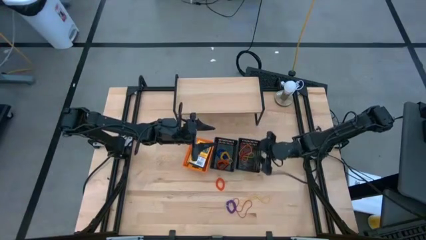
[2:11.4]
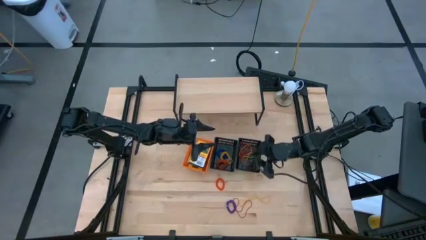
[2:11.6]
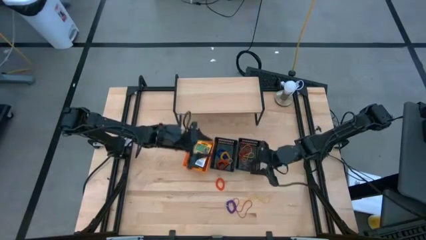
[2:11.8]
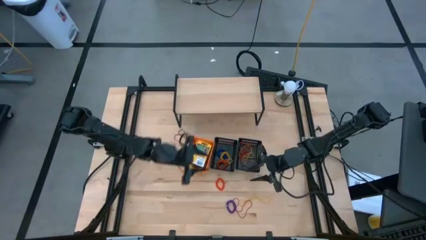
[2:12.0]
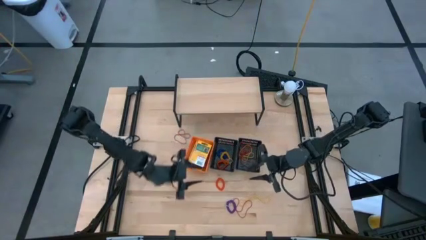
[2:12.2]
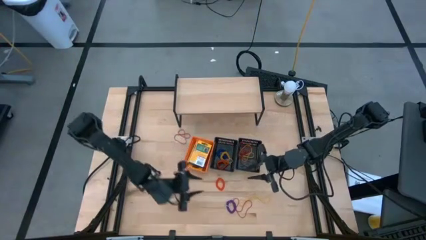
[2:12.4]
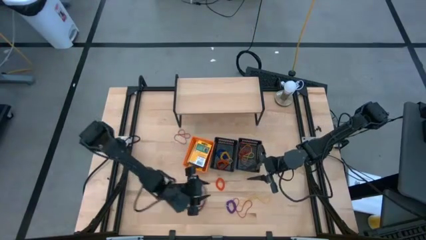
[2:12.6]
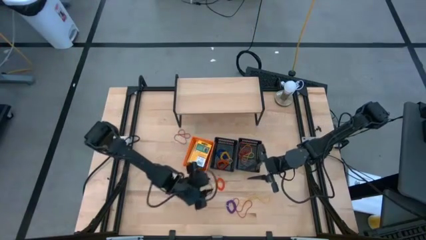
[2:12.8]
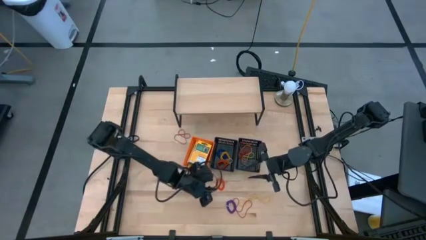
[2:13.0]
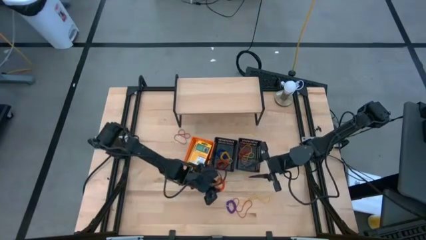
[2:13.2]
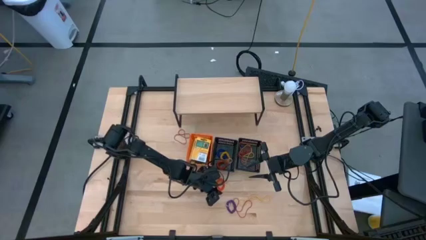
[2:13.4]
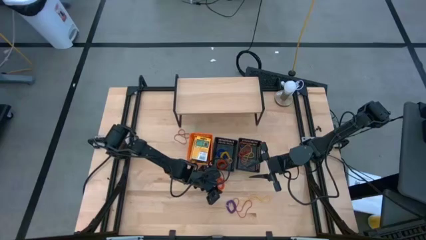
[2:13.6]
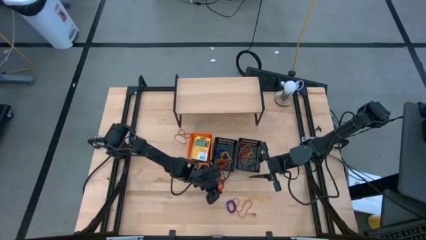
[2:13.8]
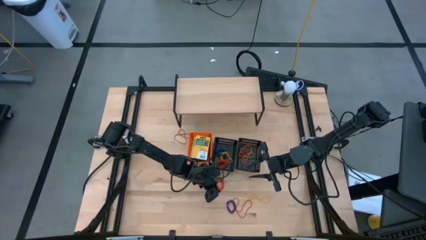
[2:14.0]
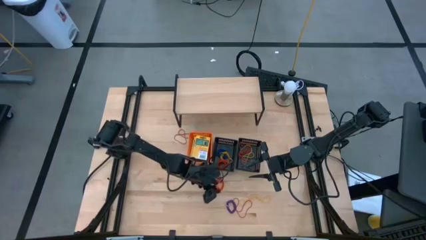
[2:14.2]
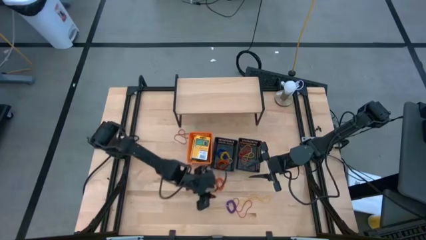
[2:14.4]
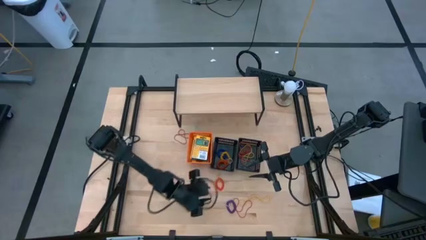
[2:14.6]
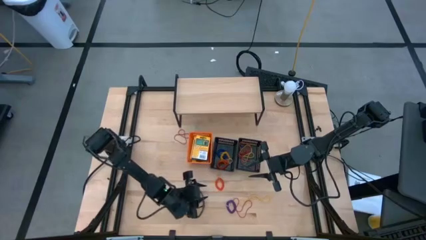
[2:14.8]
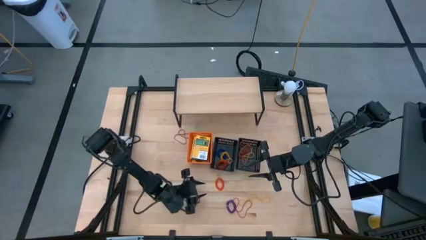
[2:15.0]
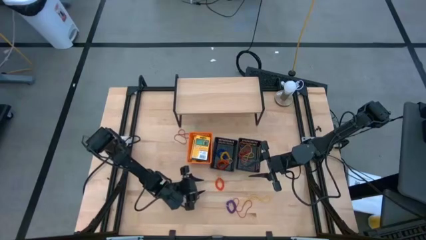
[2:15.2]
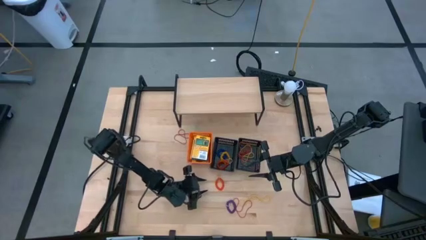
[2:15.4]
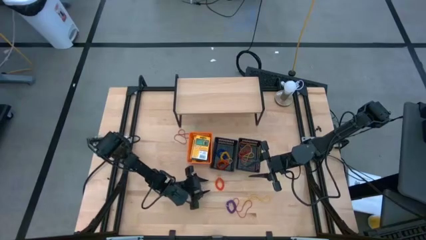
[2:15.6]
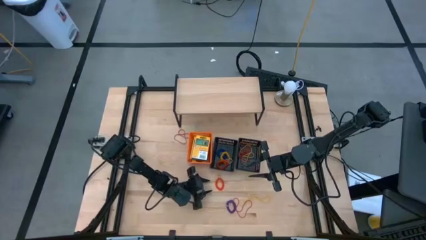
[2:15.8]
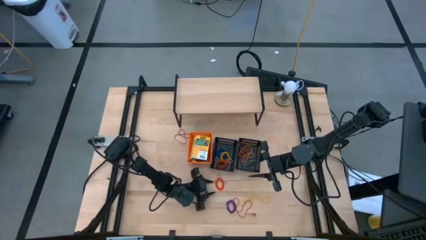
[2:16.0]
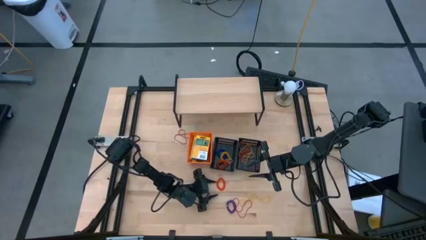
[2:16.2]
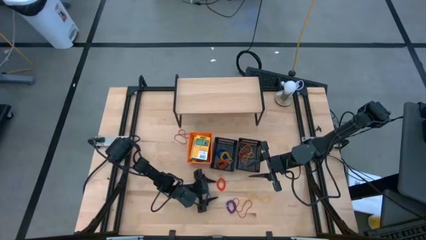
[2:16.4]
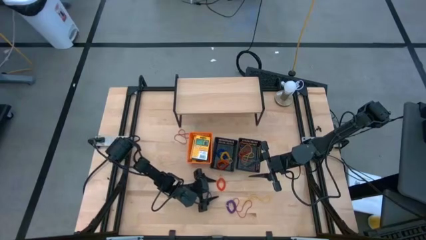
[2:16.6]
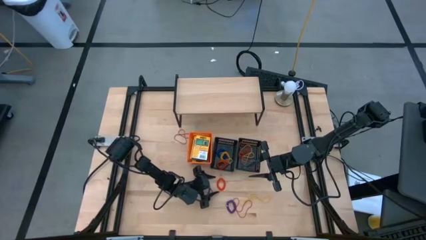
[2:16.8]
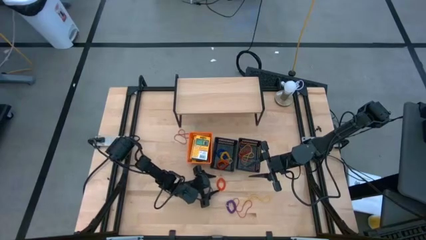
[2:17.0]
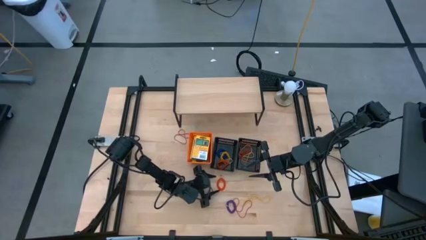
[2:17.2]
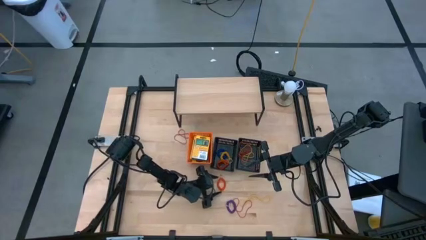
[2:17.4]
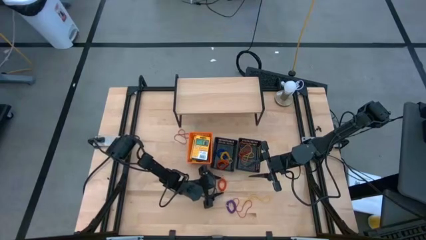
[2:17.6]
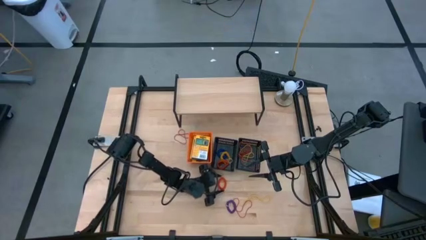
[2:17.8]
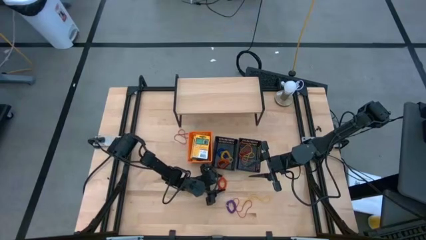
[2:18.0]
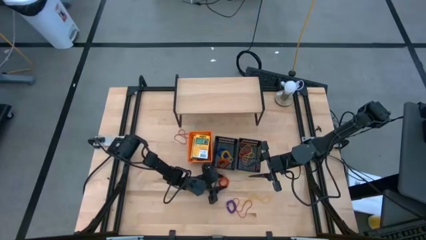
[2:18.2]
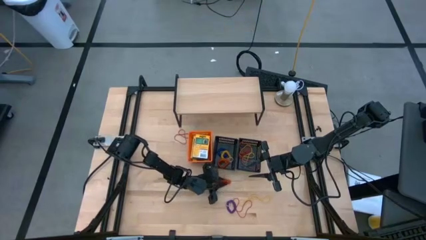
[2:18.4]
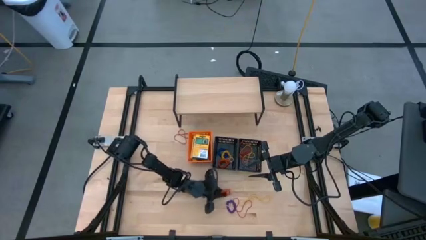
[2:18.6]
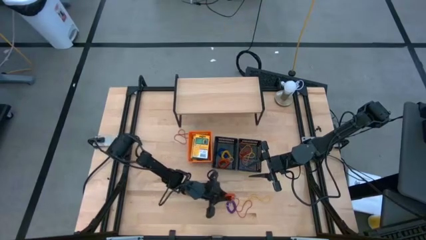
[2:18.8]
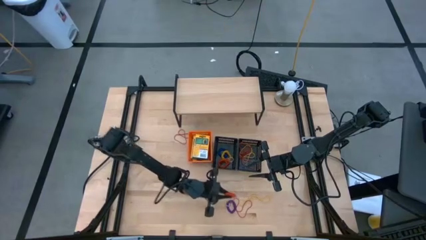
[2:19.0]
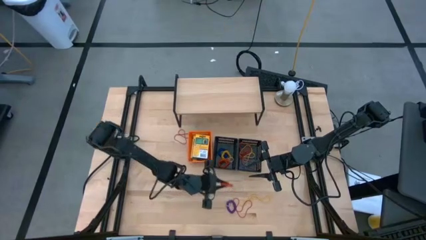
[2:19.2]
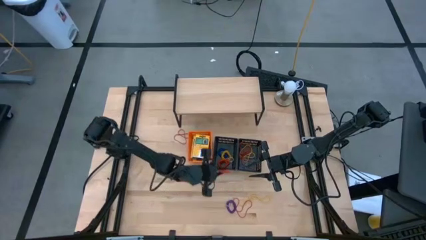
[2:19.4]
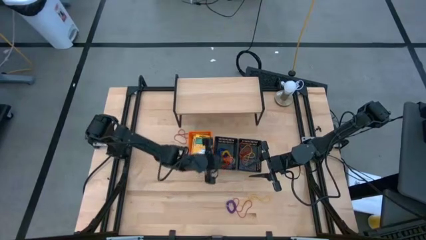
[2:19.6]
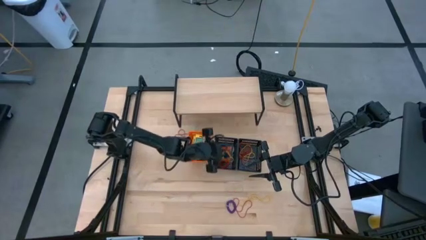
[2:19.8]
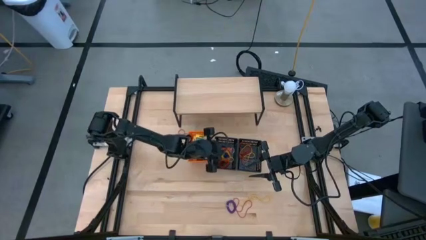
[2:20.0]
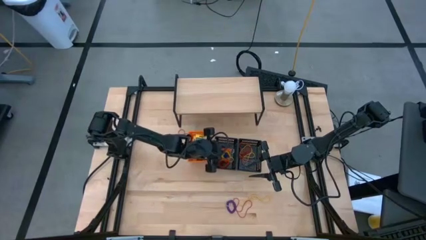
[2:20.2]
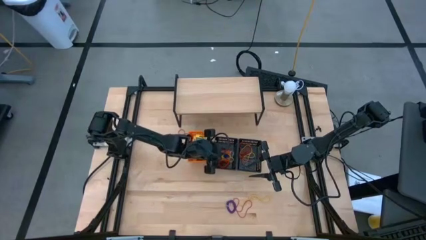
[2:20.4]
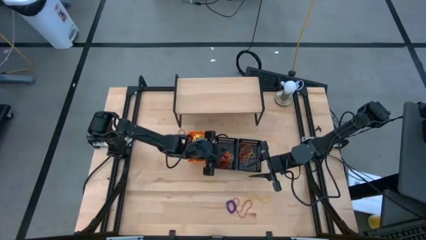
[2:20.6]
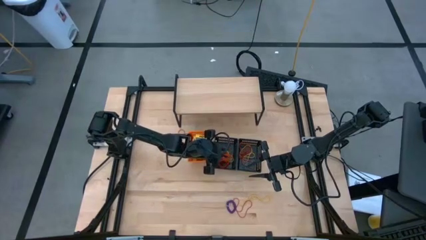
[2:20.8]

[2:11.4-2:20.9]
Task: Pick & Place Office Desk Supplies
Put the orange spring keychain into the left black bin
